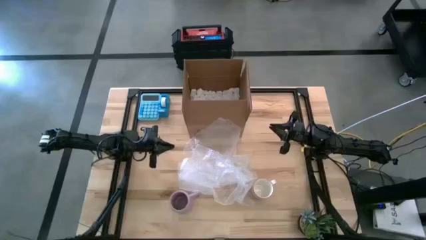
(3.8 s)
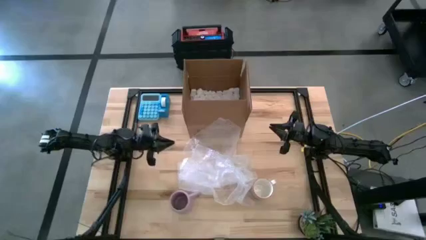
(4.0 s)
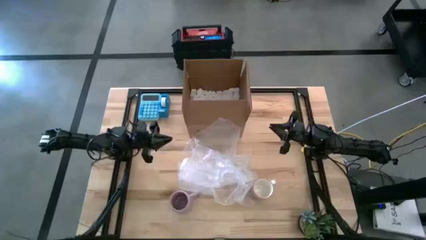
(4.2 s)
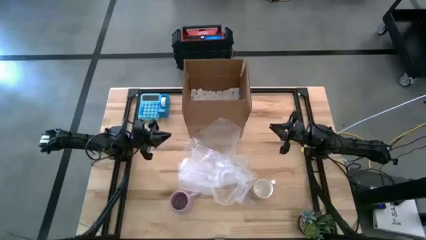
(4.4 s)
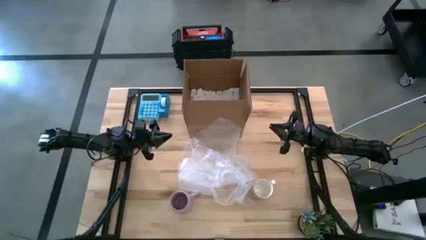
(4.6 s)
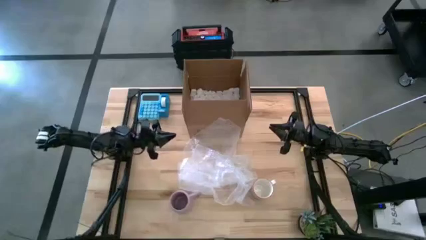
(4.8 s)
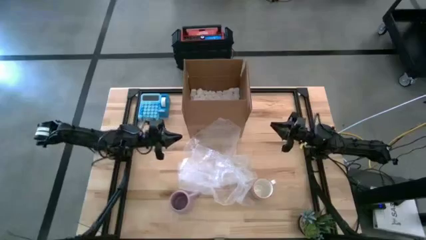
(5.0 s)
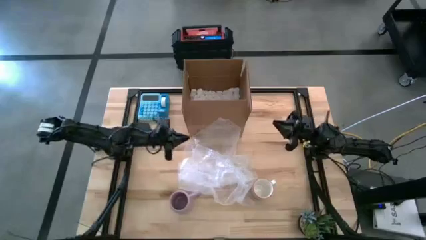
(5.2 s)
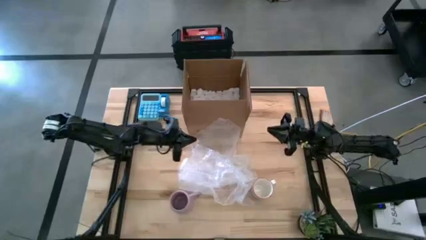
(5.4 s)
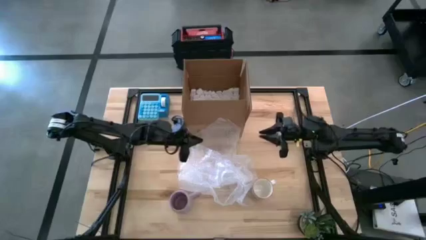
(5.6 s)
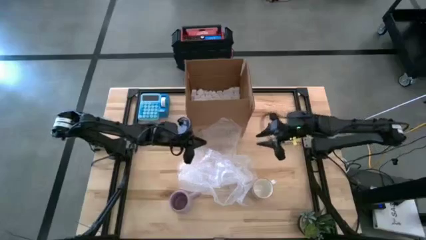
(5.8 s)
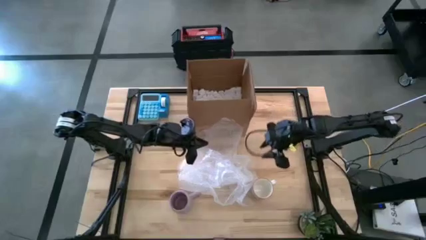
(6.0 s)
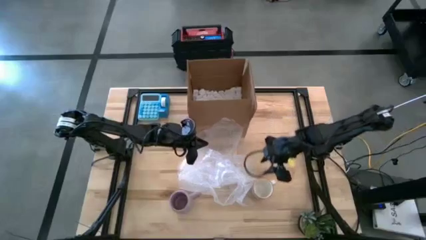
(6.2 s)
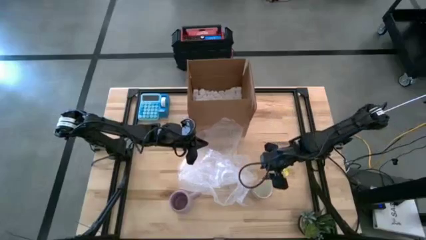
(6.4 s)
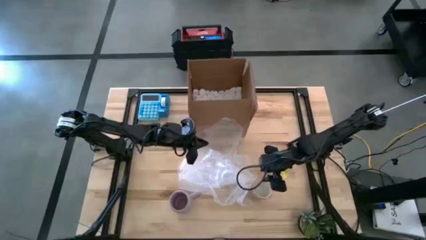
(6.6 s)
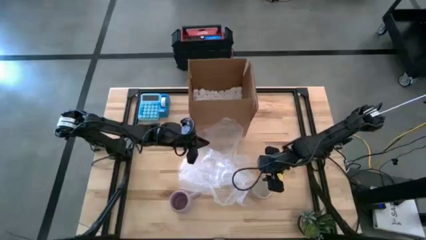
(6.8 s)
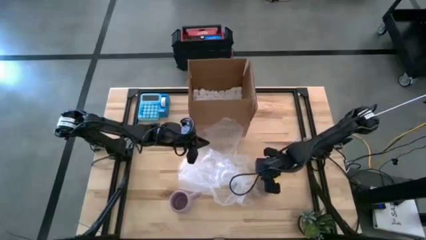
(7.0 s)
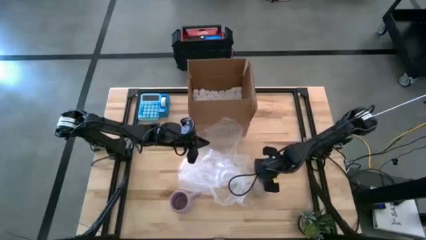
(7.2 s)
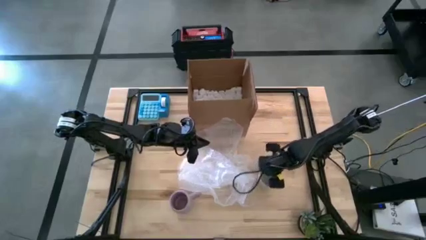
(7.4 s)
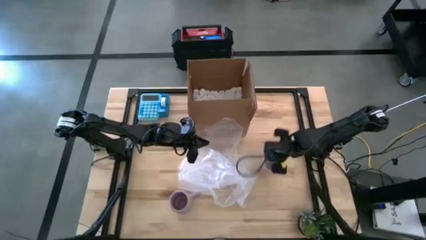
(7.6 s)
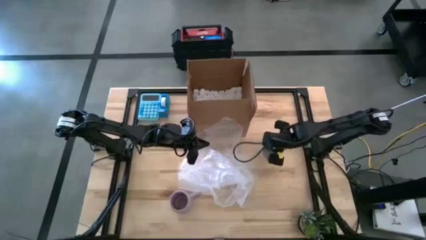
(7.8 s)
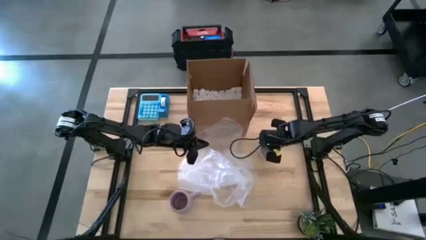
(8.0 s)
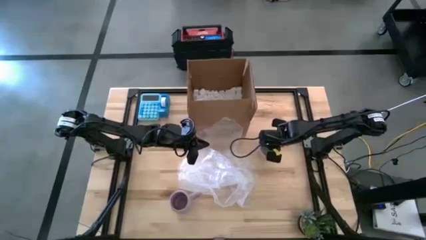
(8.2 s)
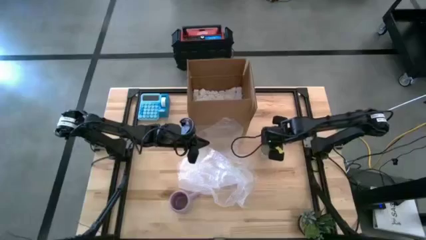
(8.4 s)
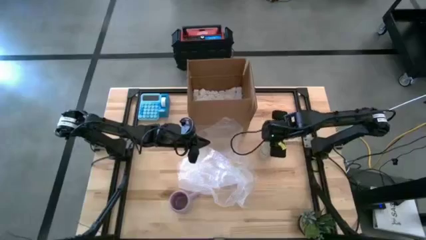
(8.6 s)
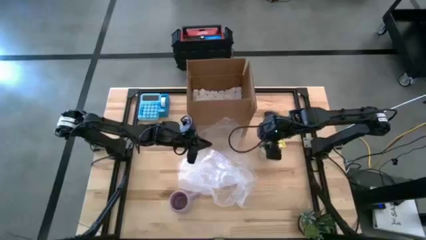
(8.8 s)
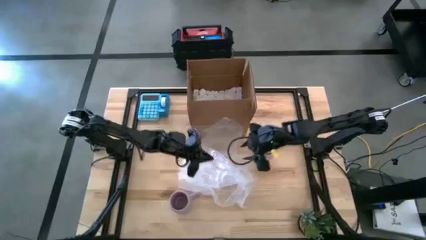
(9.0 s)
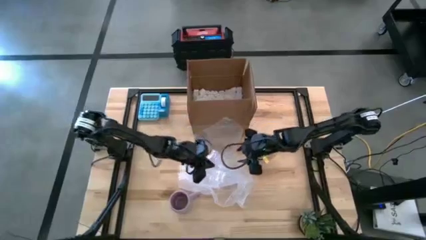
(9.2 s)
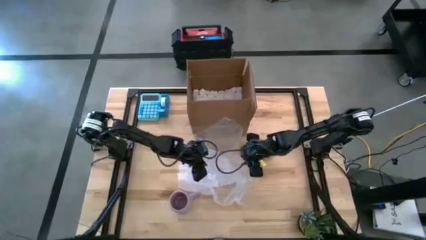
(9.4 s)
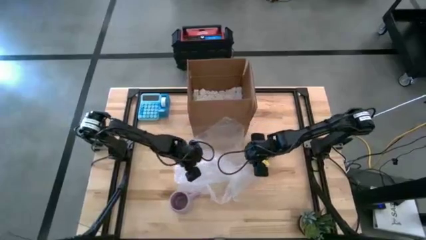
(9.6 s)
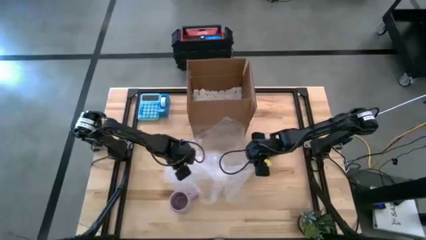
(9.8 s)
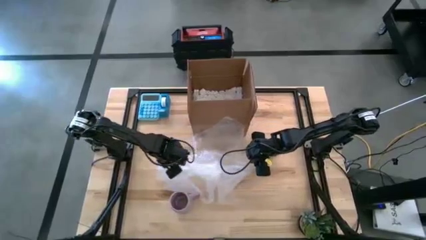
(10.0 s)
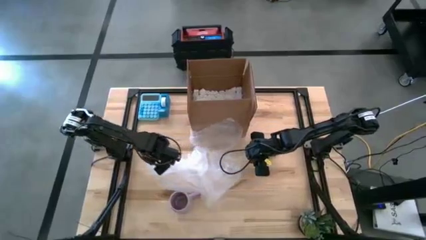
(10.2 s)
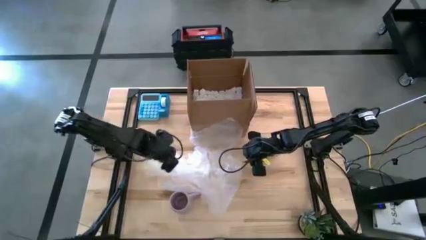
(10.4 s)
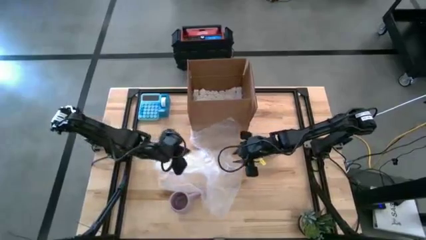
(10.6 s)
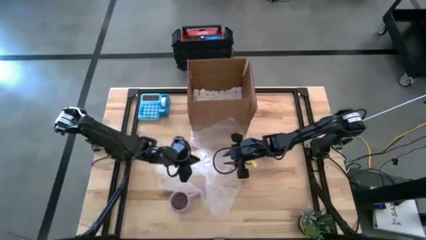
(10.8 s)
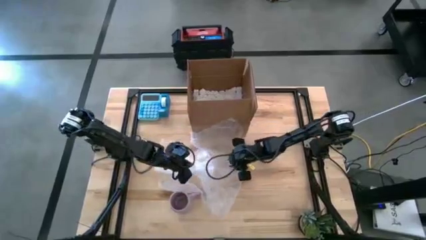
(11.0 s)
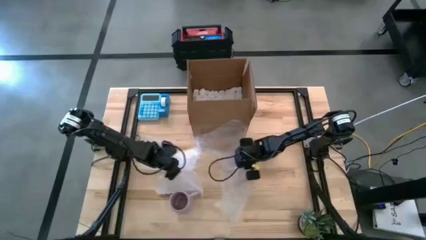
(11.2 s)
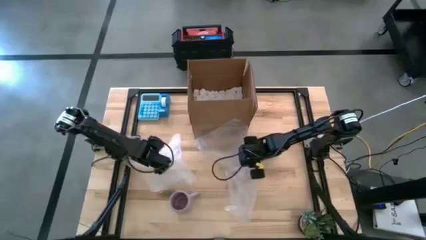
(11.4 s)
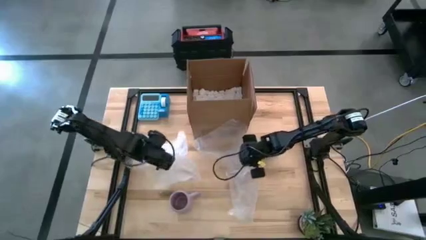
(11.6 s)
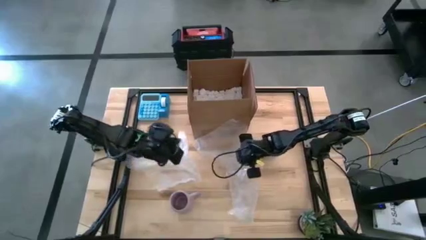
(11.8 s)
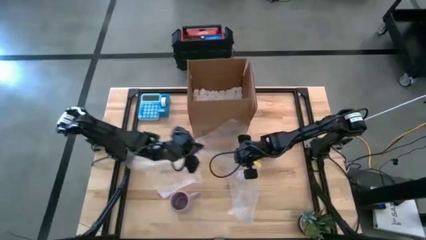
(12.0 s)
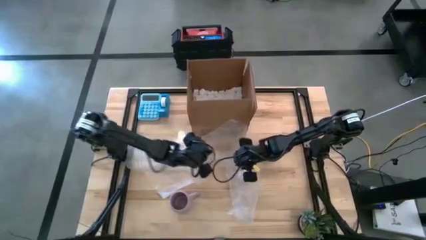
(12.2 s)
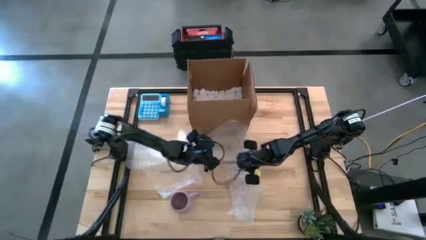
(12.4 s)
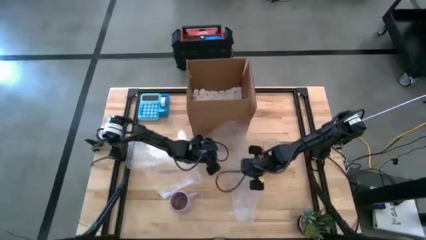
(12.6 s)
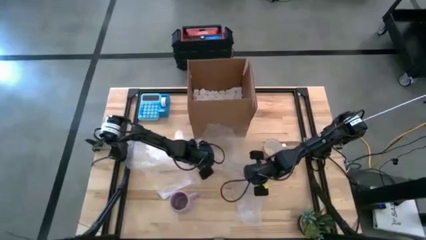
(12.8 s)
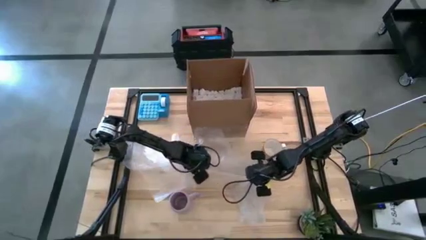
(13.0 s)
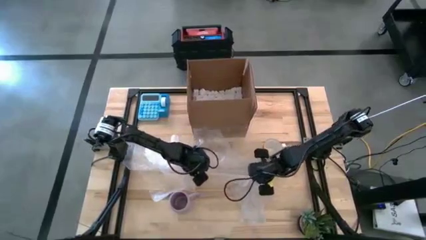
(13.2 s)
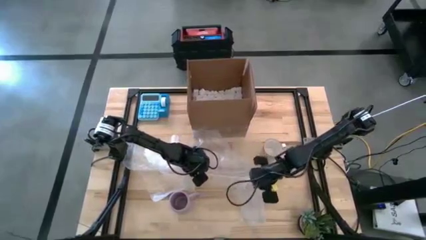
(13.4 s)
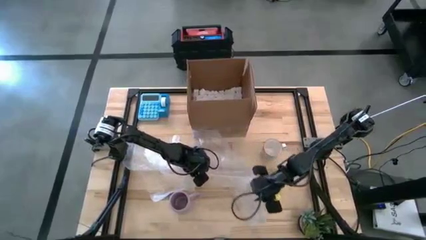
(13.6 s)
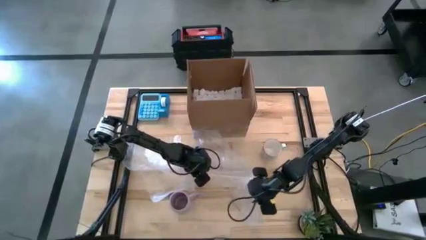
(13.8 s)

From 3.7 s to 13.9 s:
Task: wrap mug
Prepare the right bubble wrap
